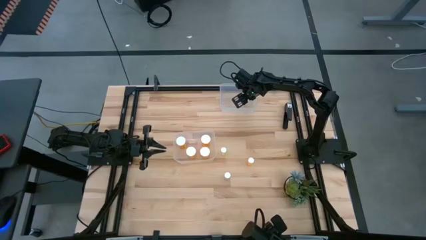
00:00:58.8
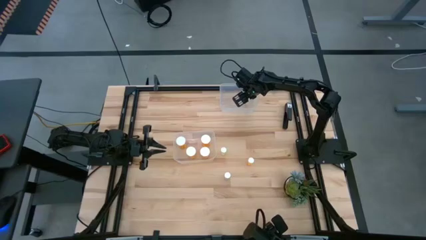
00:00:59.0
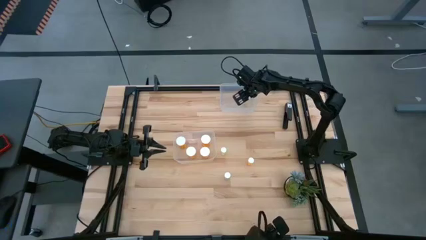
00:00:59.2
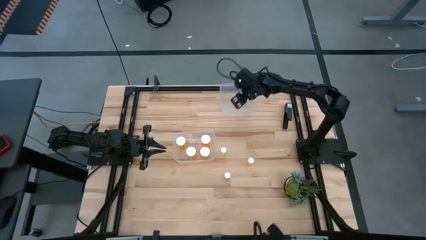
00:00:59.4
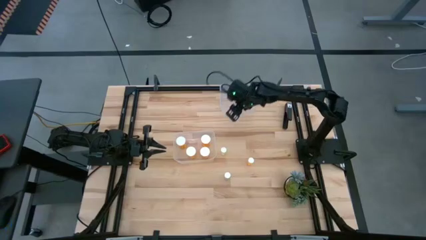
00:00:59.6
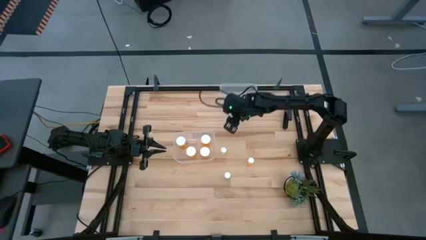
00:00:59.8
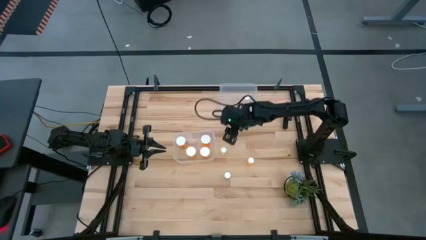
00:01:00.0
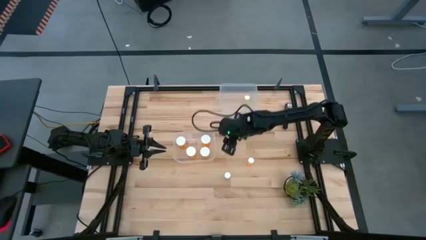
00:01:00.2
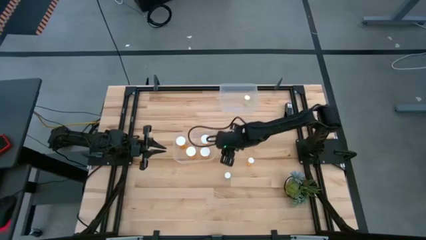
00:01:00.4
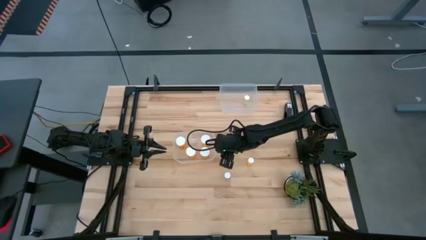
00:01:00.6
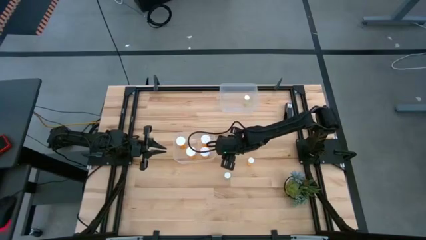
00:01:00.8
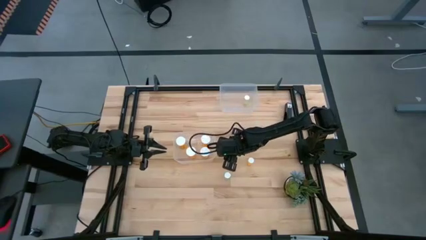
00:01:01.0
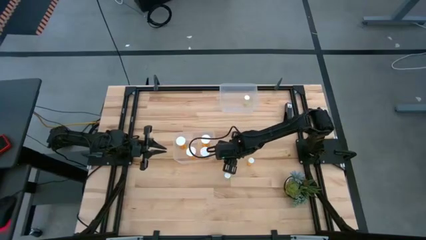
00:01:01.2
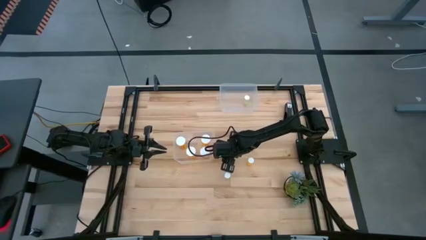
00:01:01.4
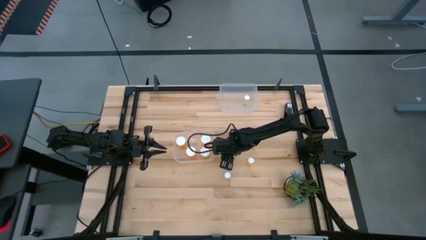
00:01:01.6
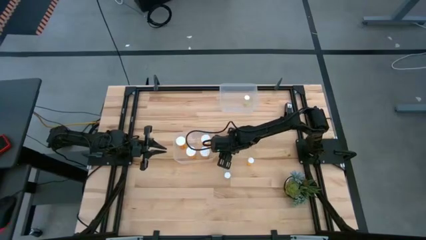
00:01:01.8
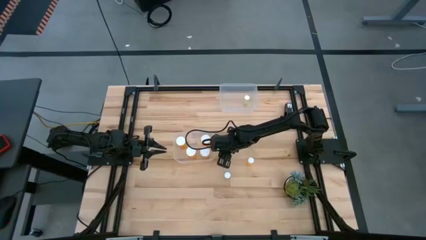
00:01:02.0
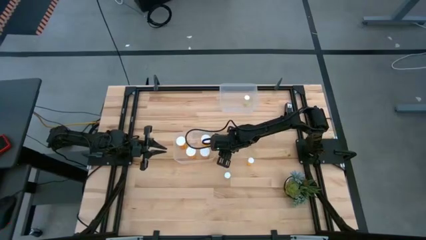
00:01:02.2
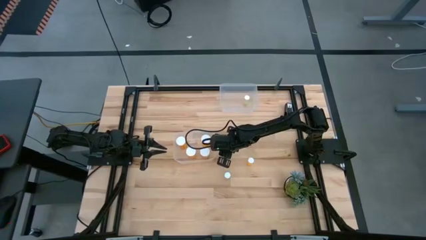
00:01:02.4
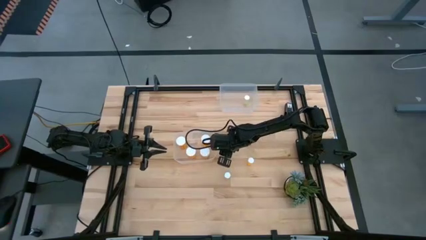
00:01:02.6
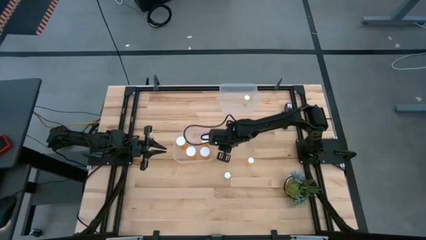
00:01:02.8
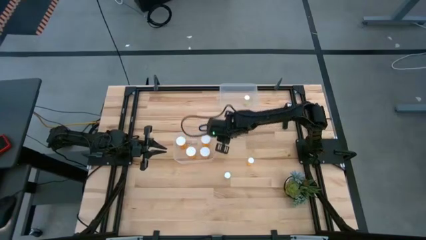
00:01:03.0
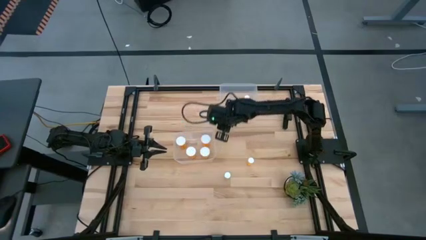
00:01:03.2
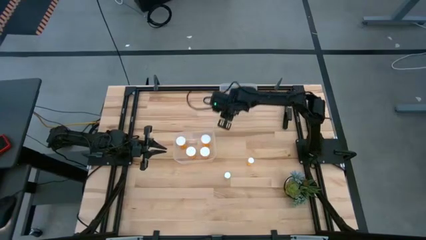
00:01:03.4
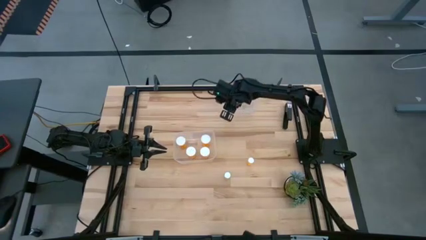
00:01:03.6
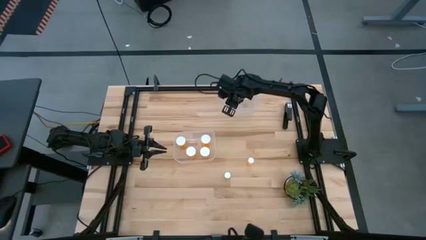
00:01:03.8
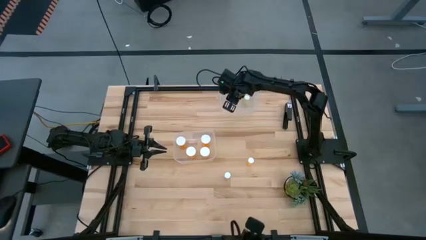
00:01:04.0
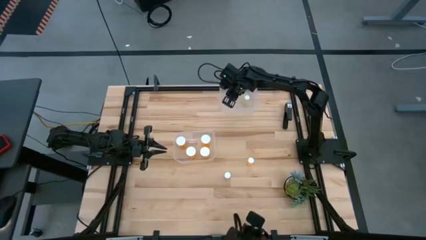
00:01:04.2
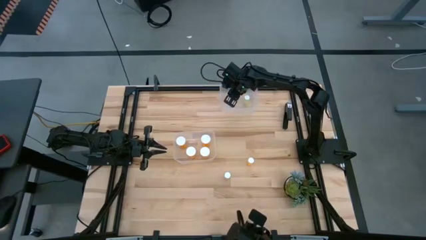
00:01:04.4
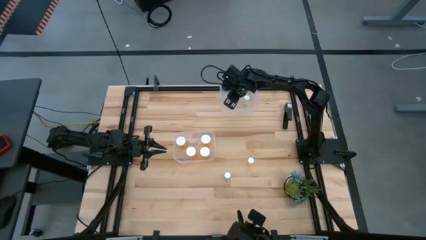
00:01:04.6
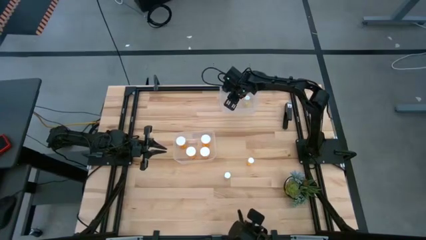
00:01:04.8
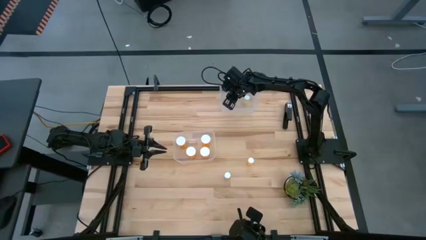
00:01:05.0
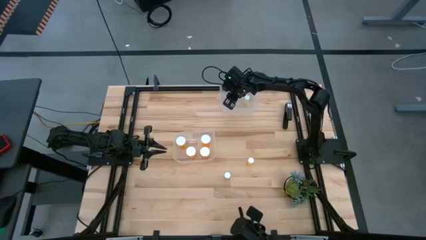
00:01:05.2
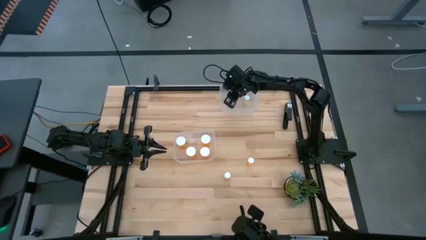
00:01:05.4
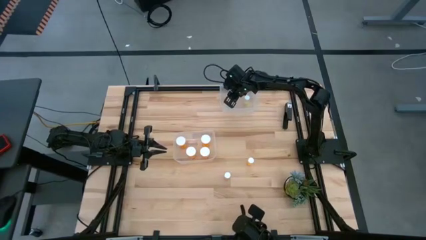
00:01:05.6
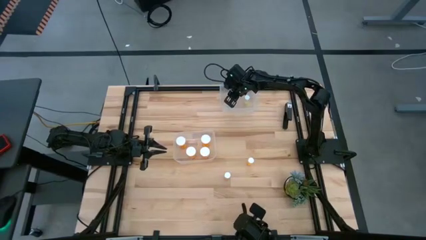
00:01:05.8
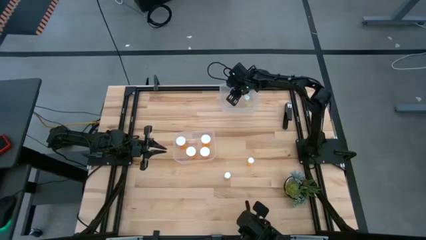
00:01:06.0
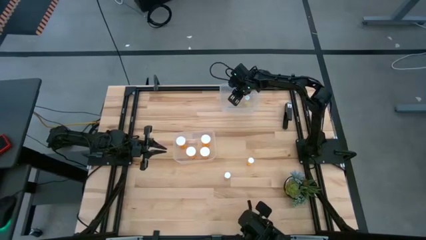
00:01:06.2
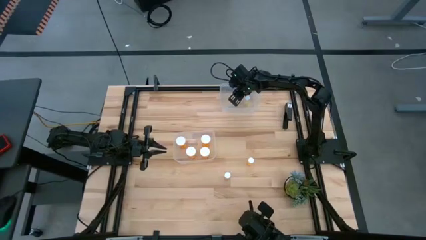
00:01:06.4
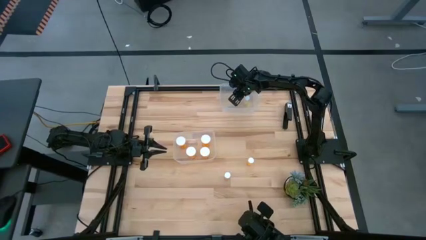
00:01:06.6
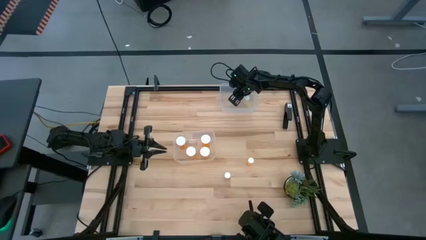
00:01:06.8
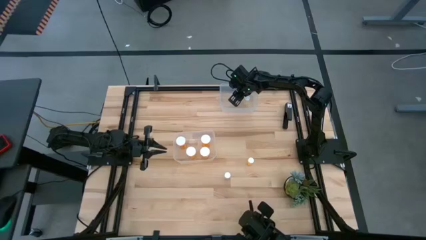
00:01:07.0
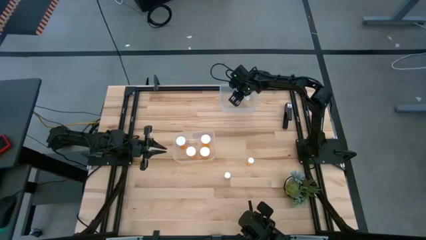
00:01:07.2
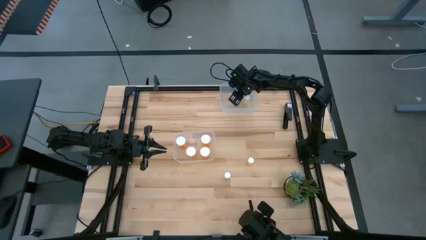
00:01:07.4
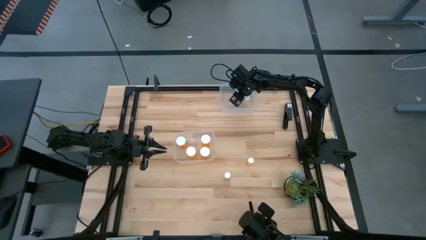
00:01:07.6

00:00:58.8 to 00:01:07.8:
Task: Pick and place medicine bottles into bin by pill shape (circle, oval)
Put the top small yellow pill bottle into the top transparent bin
